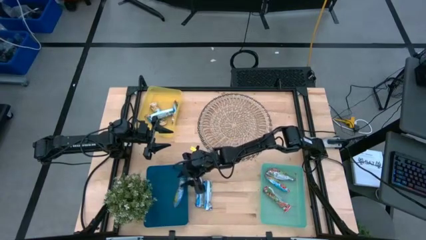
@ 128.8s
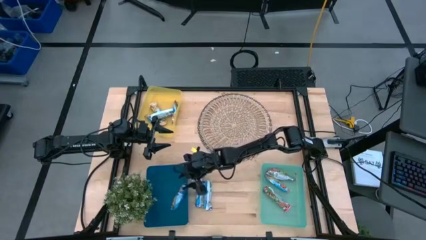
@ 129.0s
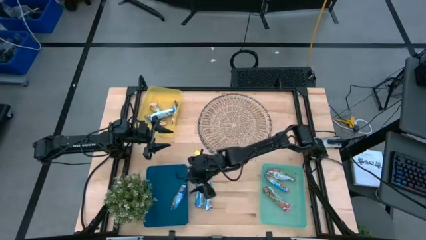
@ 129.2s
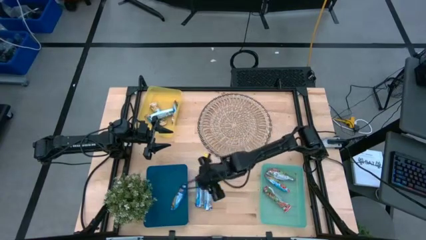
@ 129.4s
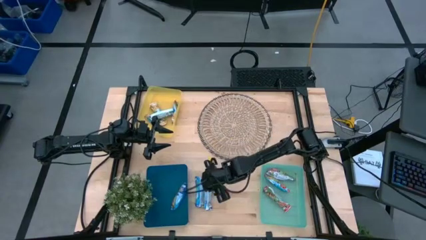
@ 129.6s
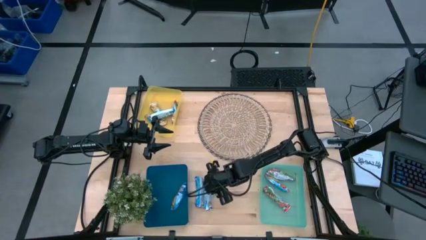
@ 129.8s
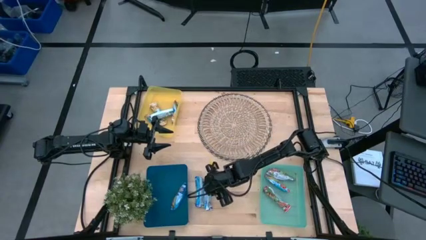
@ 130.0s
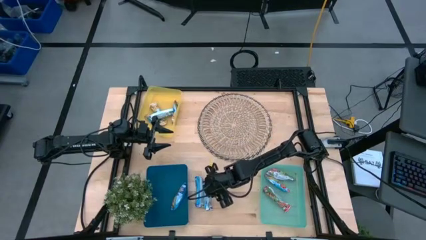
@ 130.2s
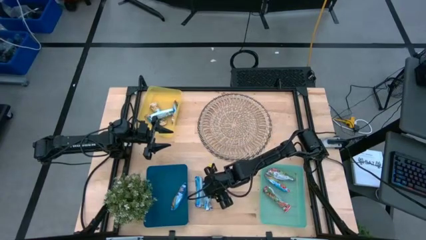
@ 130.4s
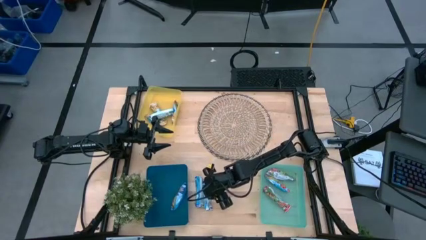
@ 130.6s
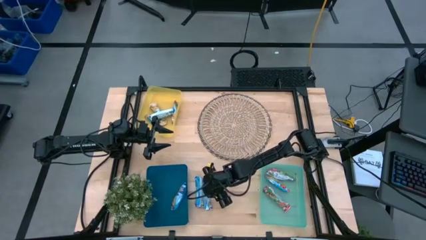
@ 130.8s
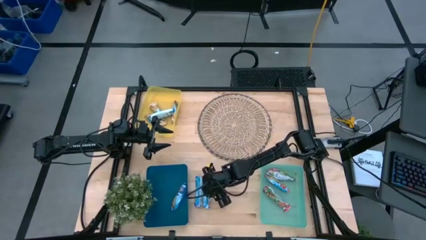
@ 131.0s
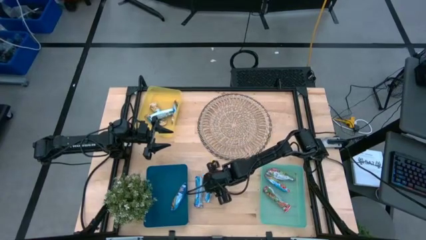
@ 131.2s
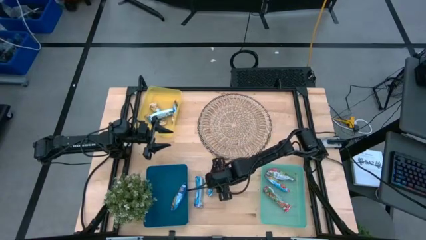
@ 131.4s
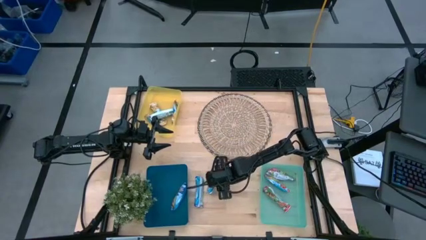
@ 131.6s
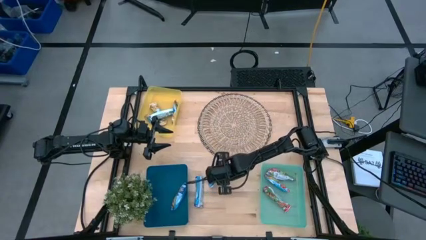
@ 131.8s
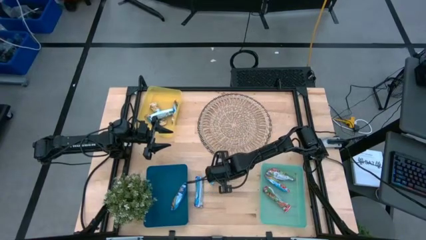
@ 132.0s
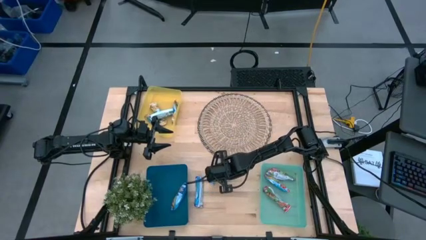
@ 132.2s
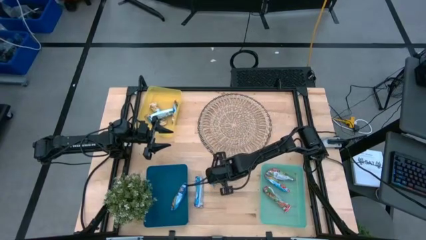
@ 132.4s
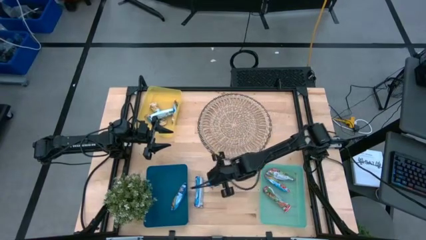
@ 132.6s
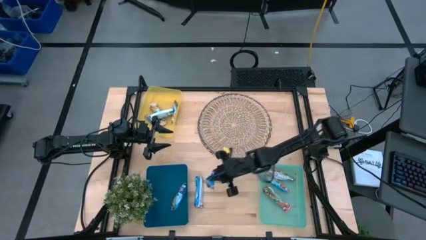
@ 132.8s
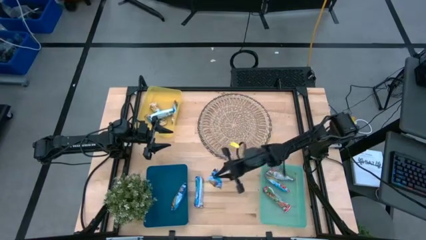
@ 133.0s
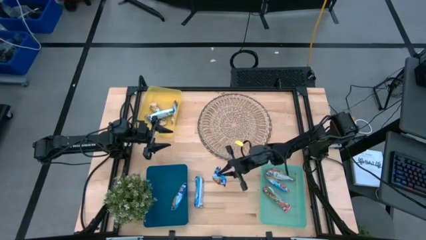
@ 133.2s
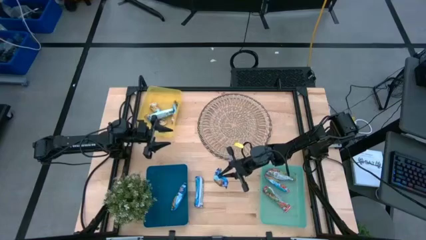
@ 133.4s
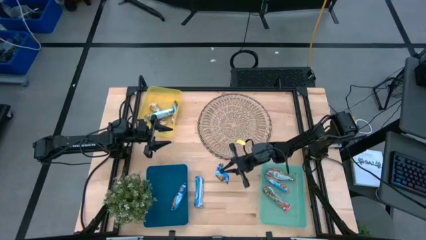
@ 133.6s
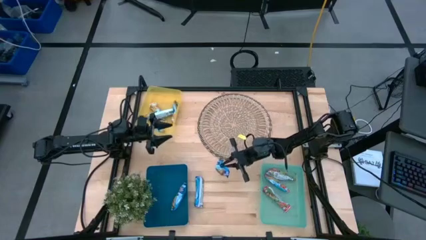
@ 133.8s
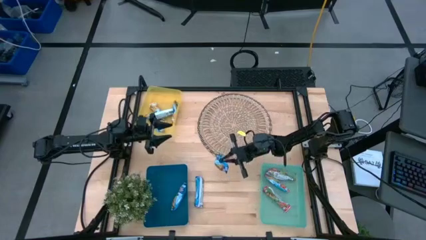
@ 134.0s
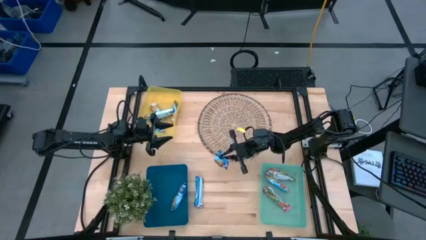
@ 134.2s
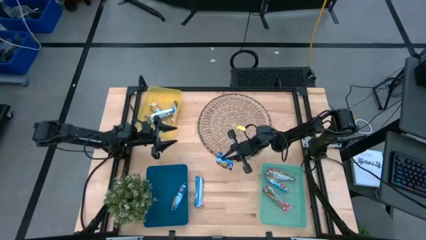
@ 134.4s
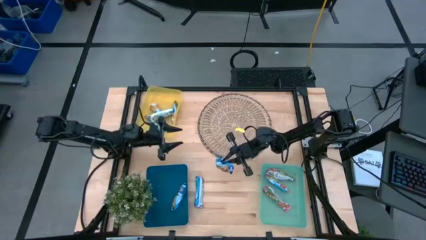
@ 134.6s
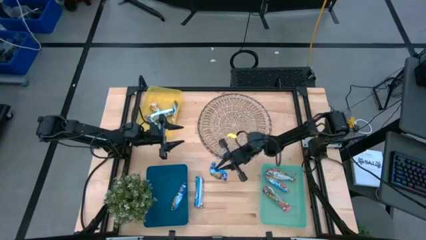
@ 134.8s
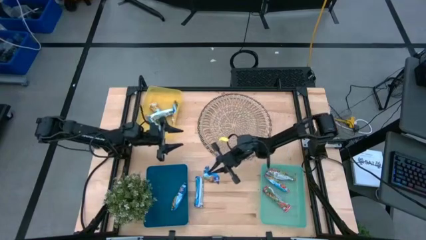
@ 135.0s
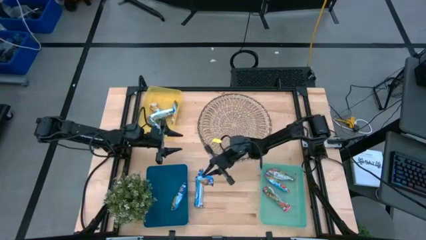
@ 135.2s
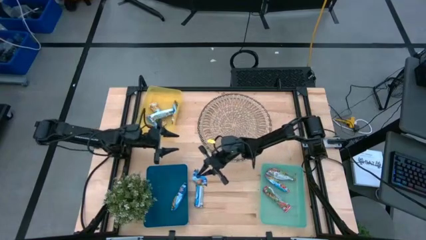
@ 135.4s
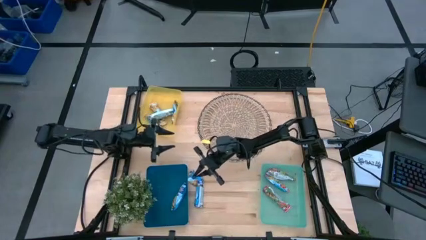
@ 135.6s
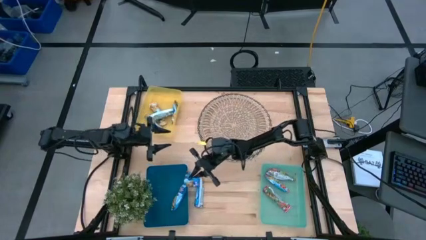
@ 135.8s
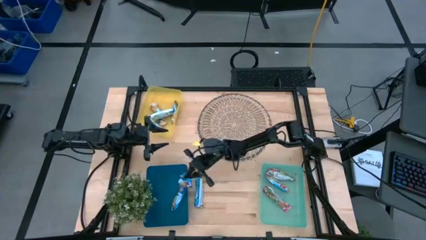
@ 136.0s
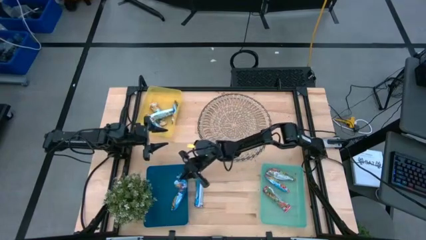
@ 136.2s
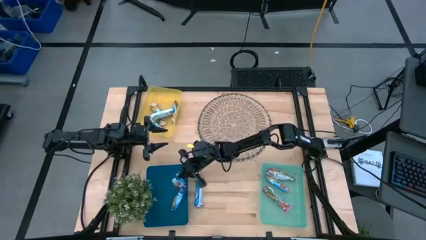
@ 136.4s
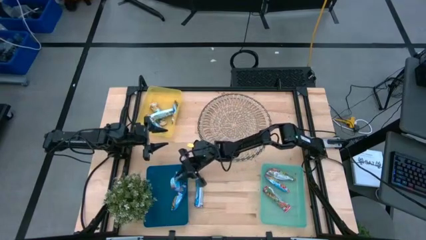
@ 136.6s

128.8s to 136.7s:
Task: Pick and place Granola Bars by type
Put the blue granola bar into the blue bin

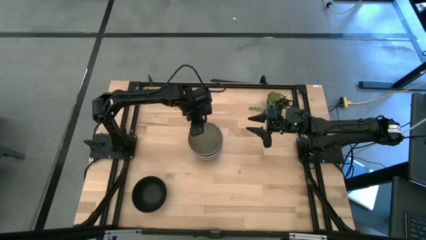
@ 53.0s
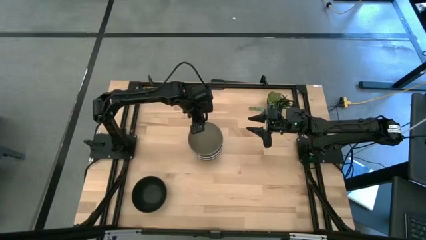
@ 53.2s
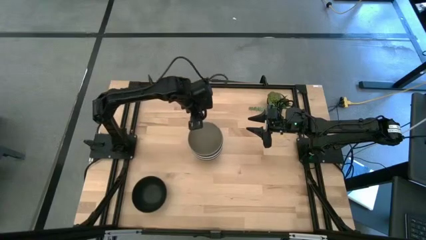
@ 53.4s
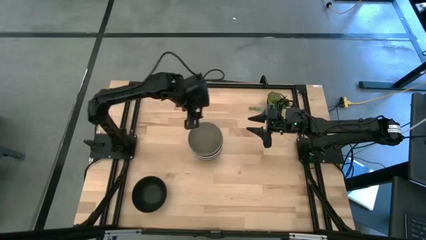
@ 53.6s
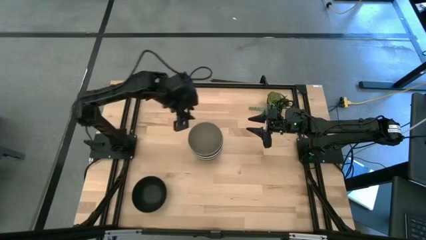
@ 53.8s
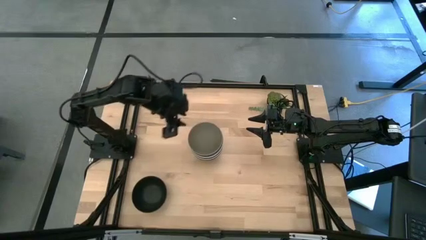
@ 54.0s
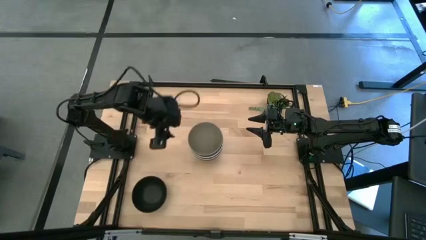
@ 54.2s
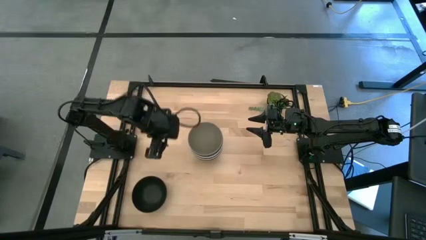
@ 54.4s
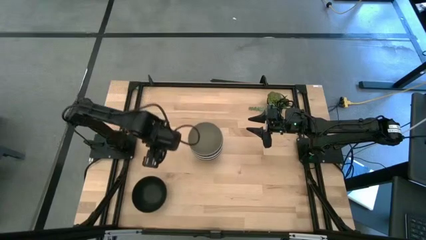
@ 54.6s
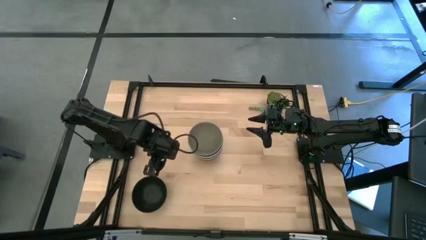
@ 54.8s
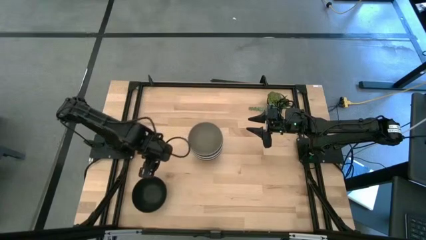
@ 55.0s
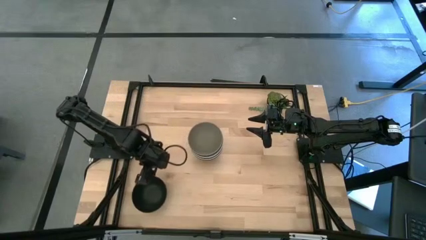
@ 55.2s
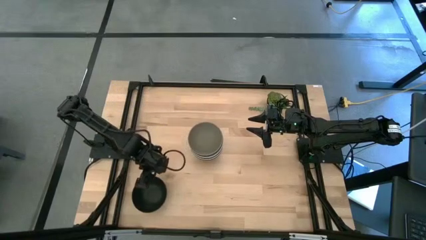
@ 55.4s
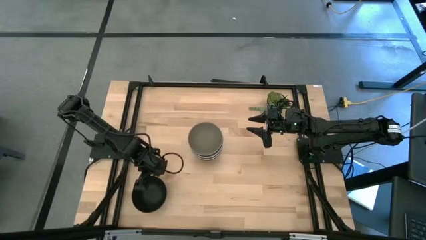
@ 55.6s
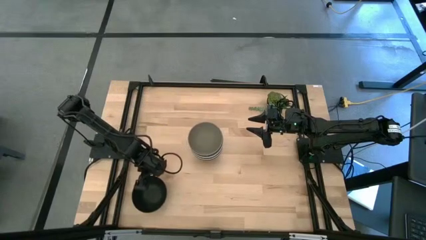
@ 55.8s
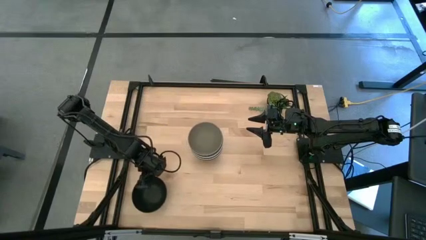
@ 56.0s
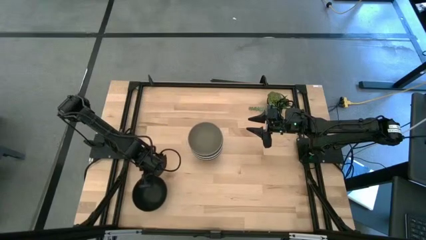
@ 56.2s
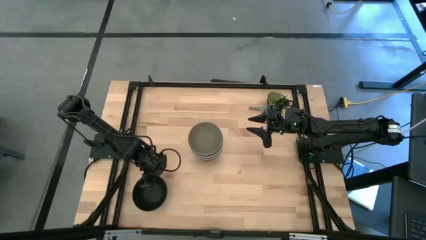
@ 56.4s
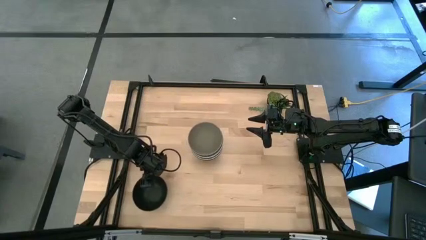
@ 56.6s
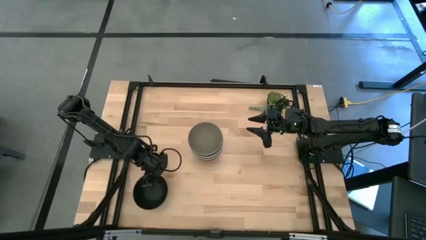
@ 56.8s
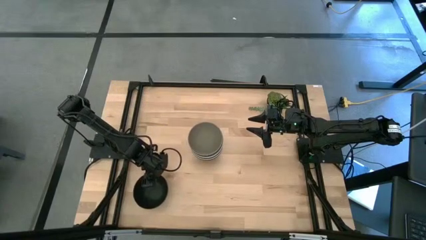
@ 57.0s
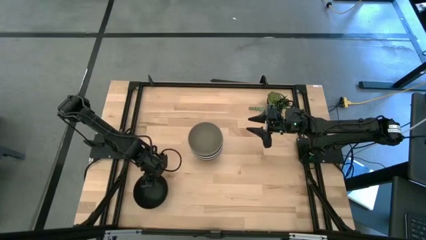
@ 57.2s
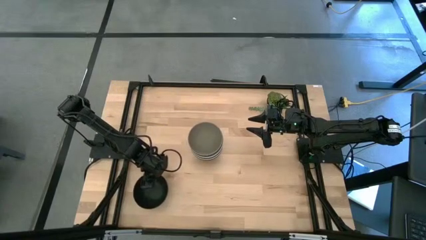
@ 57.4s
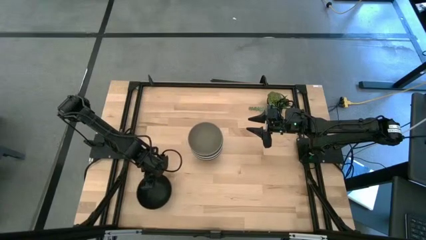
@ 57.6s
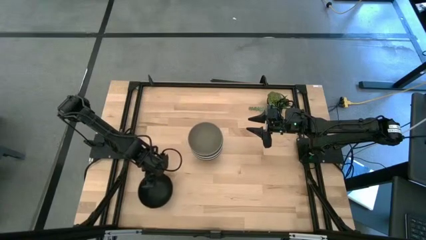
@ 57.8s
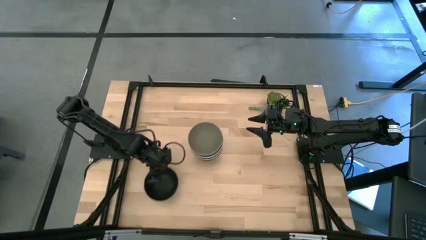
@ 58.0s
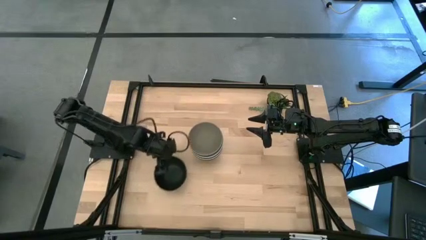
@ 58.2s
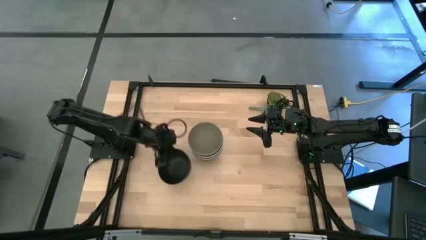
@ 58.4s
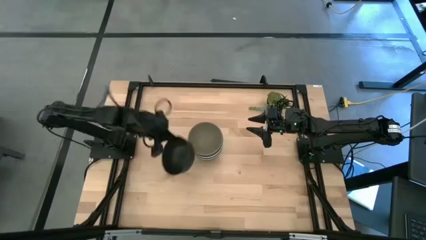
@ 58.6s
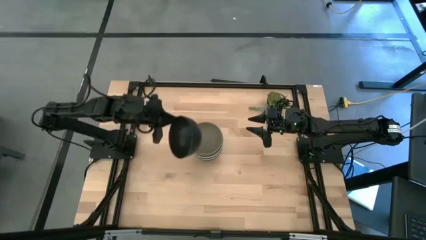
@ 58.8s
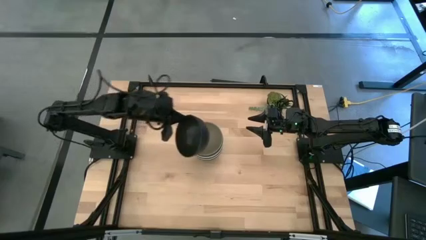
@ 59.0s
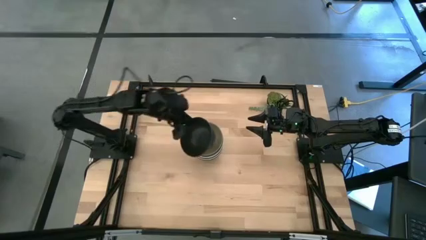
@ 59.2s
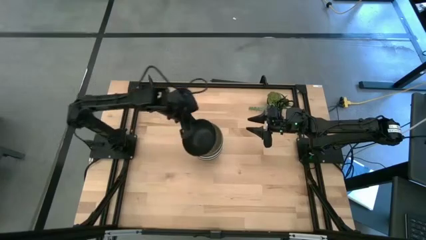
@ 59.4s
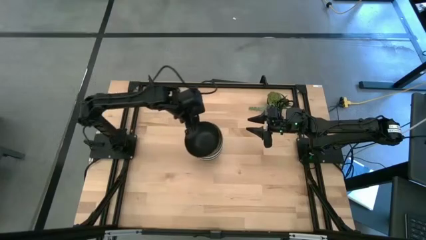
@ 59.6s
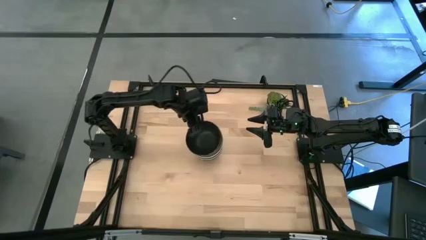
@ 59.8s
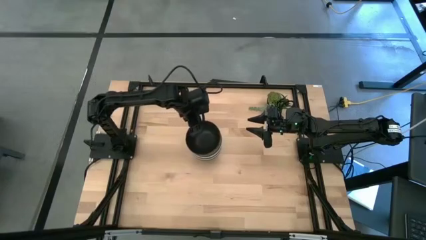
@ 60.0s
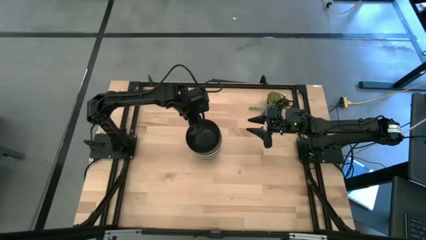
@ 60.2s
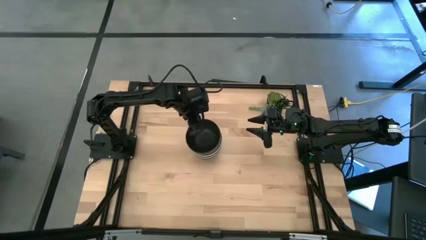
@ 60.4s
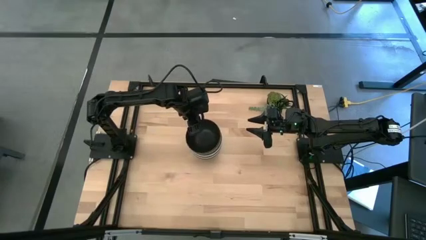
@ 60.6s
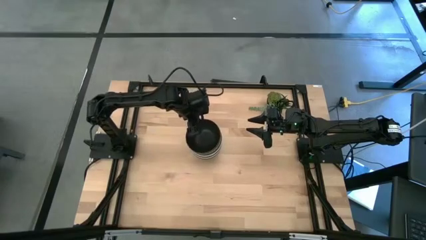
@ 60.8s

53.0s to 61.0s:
Task: Nest bowls inside each other
Stack the black bowl on the stacked bowls
